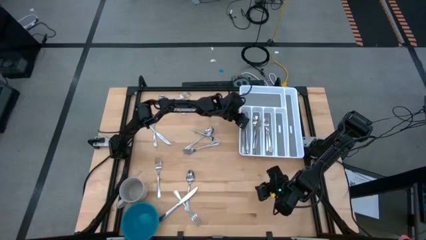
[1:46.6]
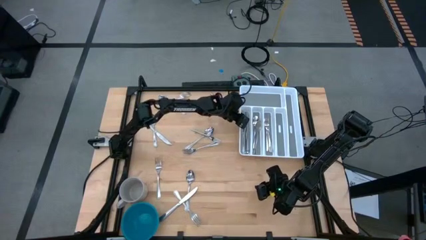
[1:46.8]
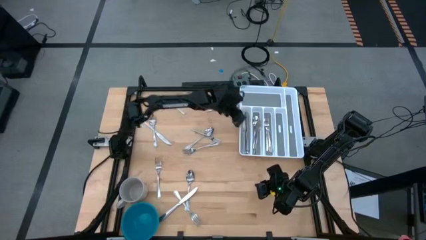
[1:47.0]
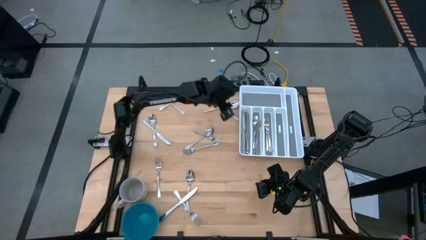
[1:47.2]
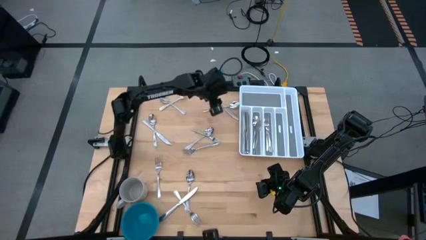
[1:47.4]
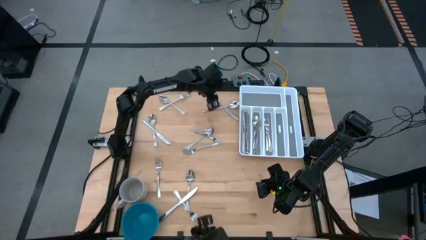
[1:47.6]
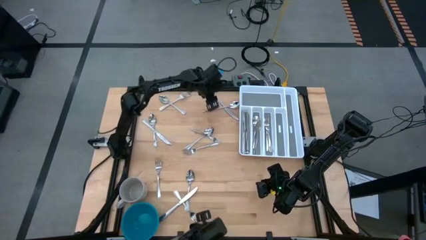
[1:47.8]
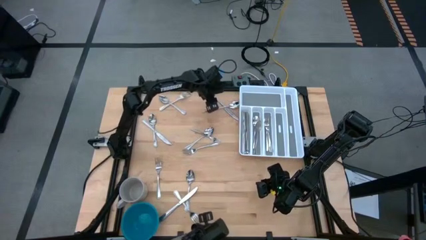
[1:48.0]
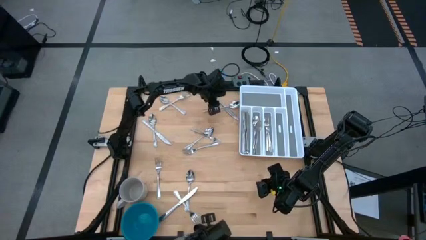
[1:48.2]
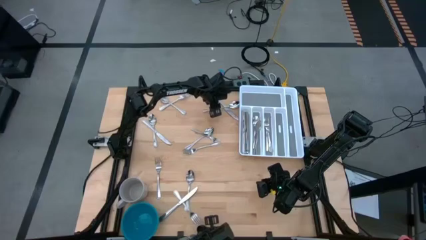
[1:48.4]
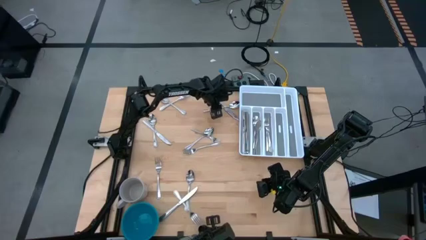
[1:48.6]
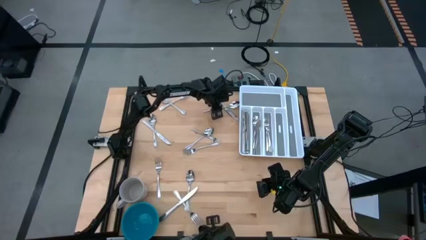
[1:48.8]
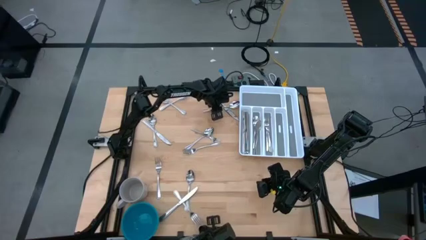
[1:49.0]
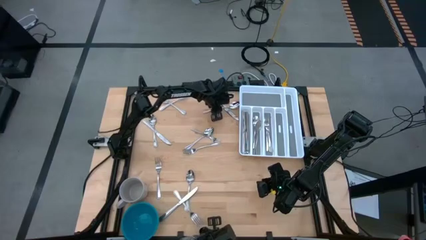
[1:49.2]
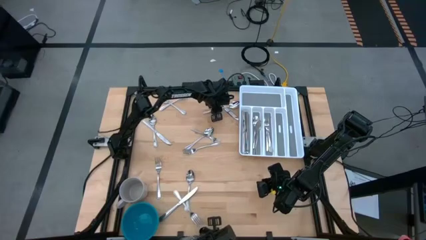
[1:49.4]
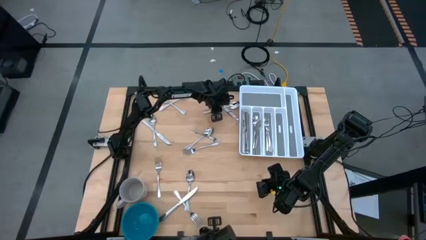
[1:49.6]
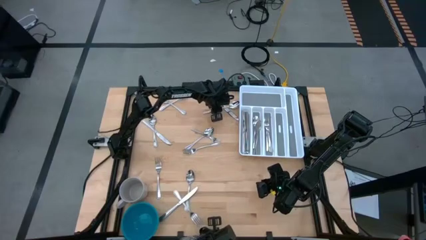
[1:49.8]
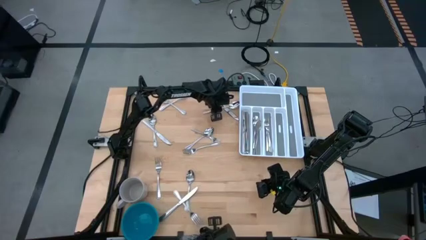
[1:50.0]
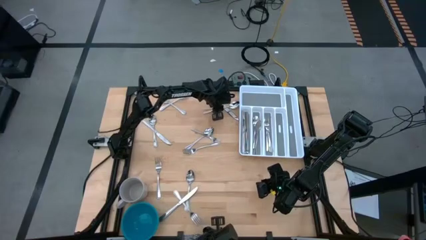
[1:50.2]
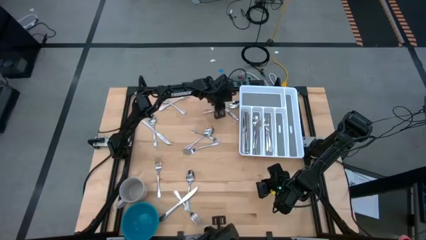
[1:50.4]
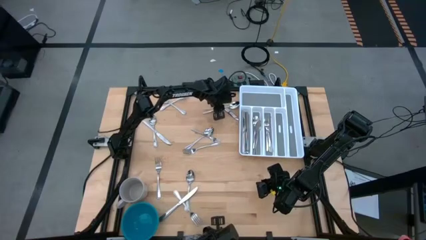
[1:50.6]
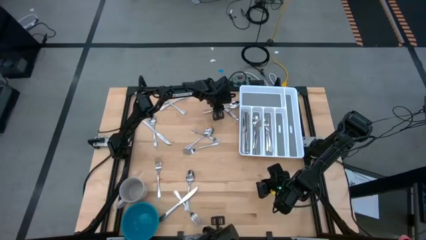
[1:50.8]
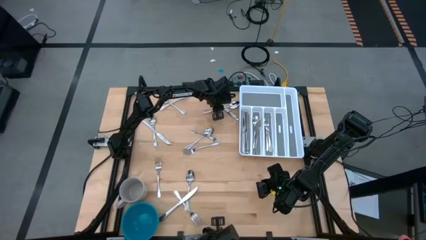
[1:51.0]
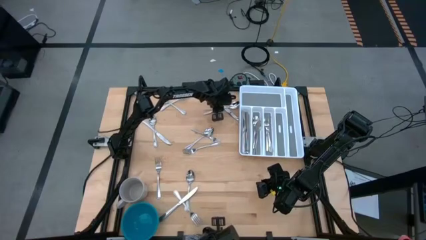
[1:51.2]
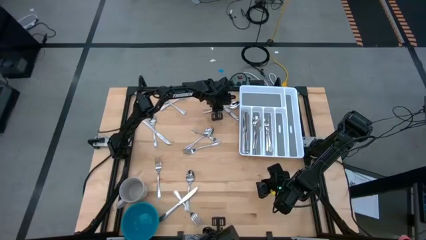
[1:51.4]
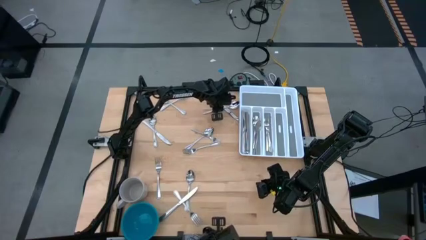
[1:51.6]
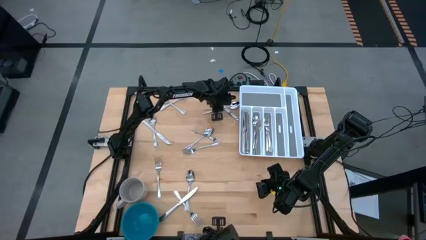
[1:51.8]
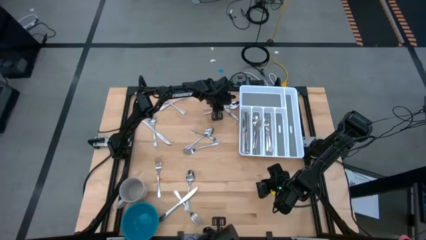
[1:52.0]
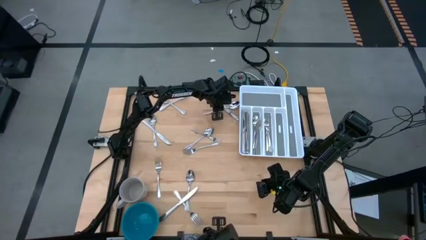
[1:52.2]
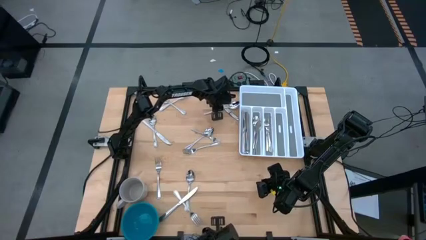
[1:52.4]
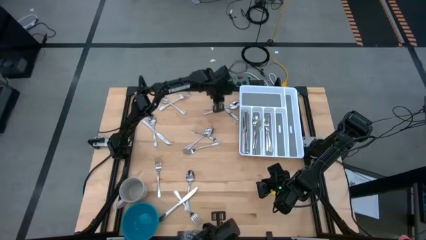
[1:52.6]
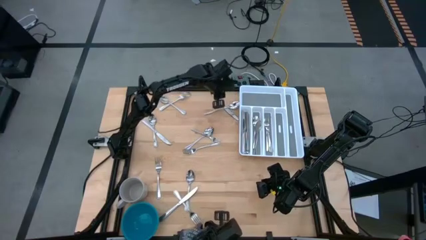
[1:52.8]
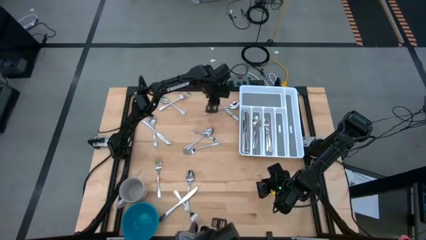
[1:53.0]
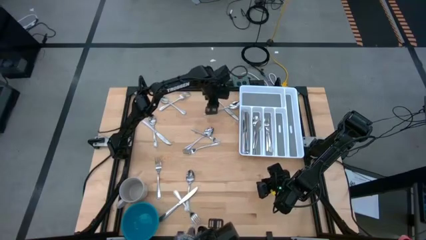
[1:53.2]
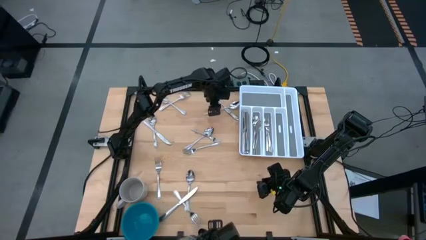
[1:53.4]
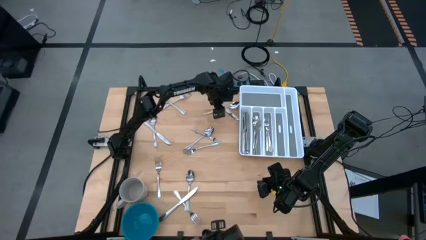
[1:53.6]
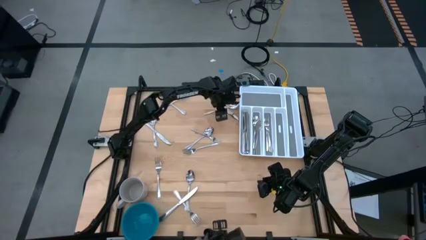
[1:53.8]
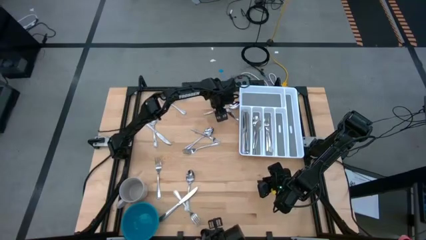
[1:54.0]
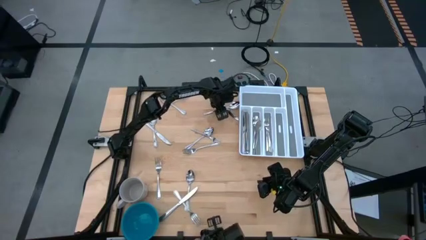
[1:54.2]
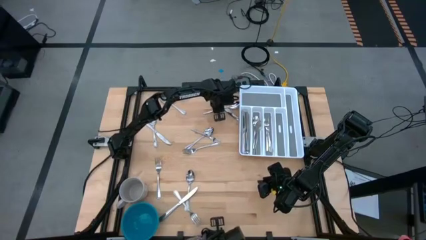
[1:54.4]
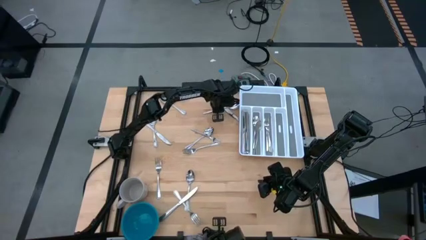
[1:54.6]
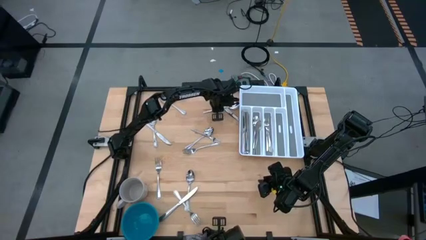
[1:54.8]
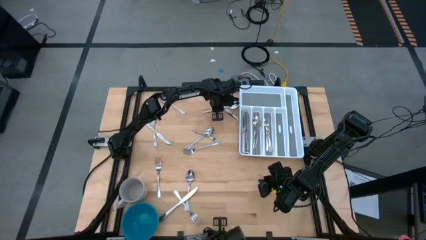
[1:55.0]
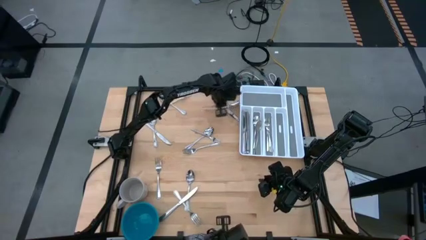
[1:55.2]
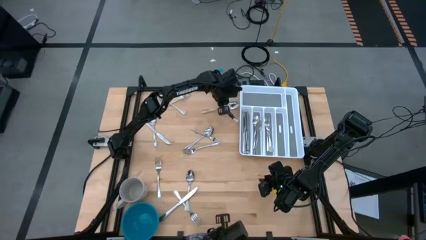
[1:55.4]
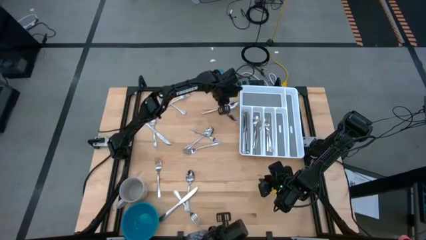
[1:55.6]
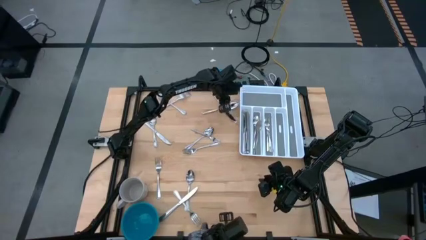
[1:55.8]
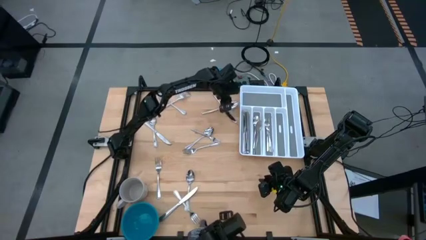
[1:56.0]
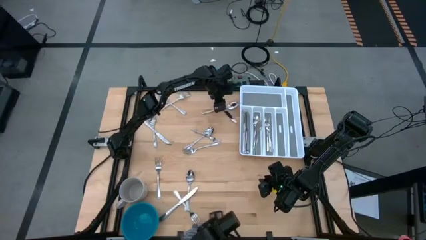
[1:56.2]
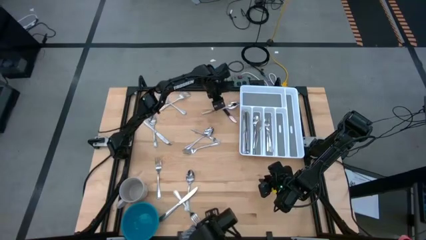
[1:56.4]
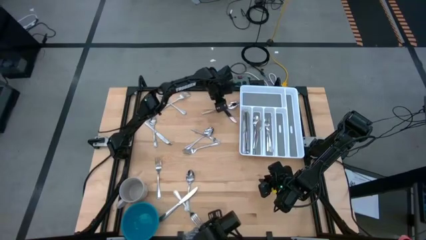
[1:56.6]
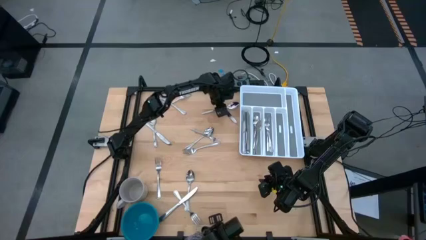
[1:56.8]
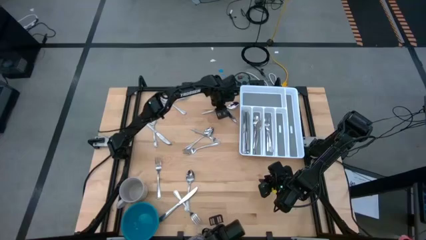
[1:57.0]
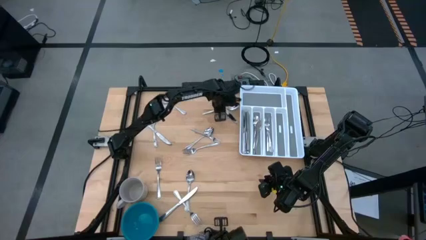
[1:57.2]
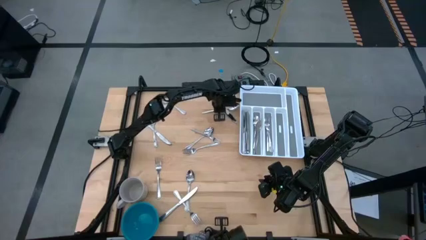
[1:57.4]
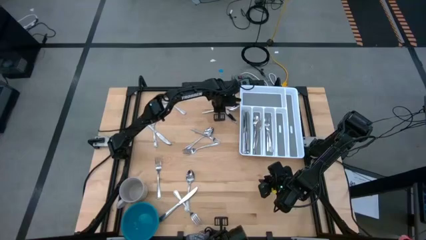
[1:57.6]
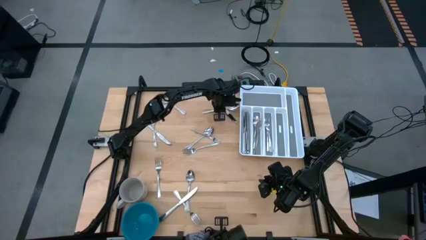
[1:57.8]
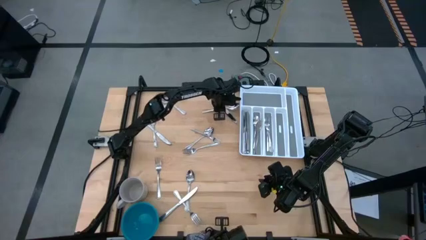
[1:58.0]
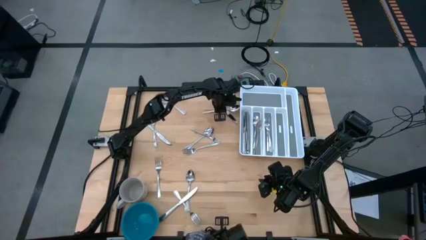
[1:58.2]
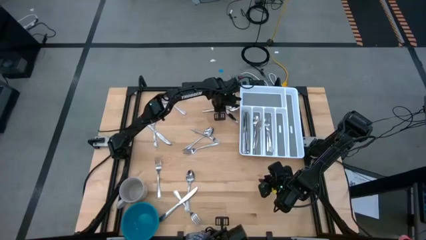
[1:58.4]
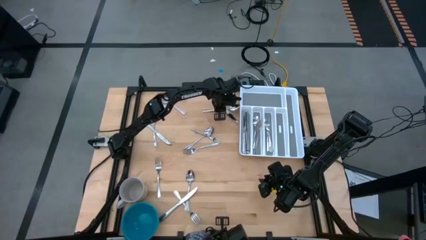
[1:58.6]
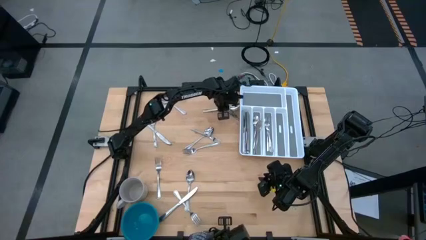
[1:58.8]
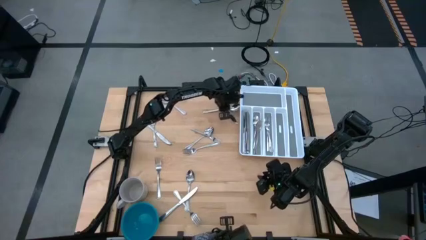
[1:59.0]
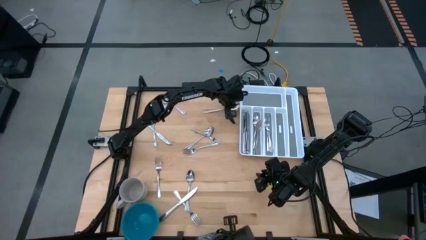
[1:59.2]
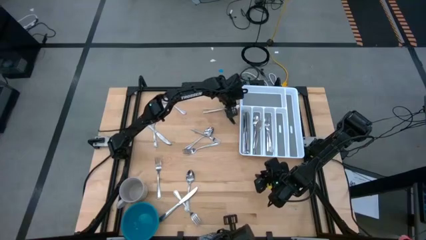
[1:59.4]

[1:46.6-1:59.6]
Task: Sort silverware
Put the spoon into the silverware tray

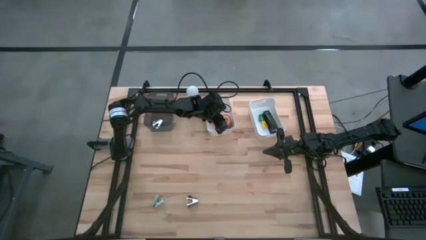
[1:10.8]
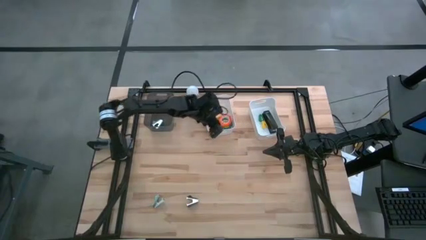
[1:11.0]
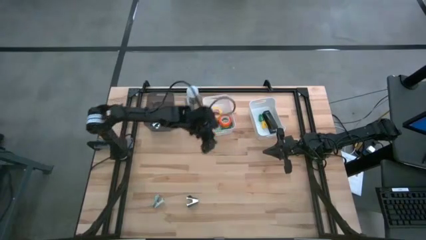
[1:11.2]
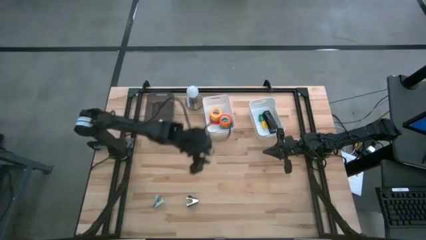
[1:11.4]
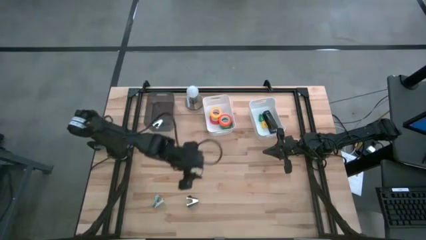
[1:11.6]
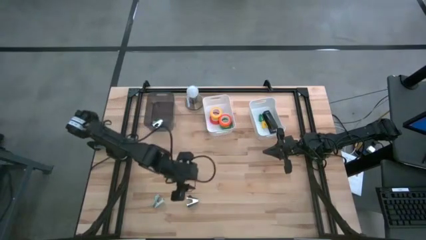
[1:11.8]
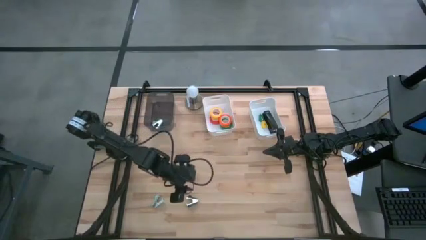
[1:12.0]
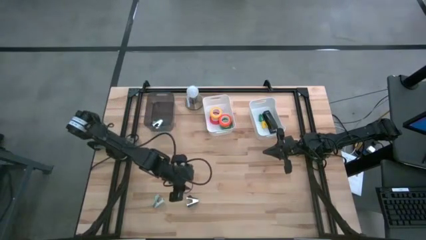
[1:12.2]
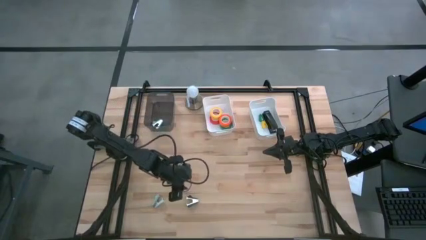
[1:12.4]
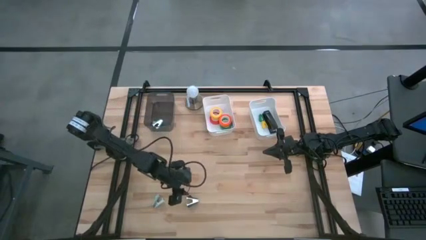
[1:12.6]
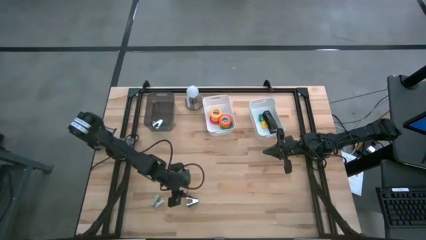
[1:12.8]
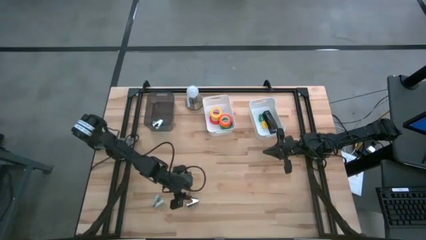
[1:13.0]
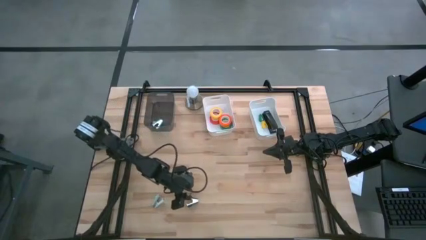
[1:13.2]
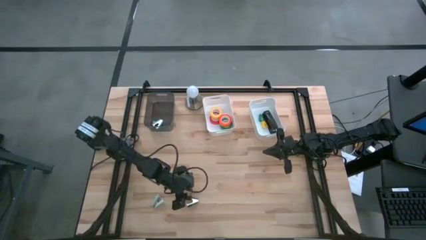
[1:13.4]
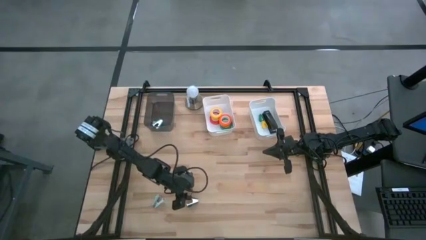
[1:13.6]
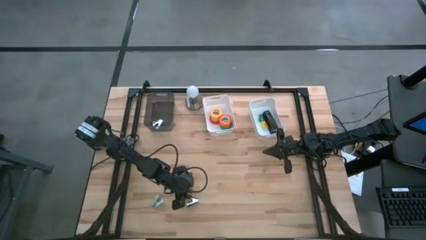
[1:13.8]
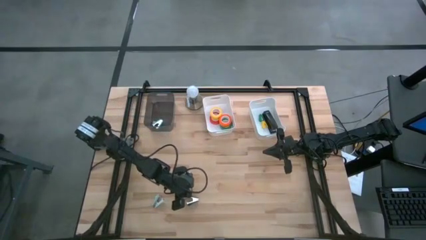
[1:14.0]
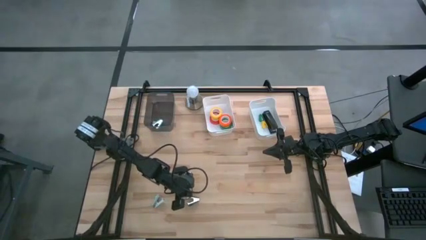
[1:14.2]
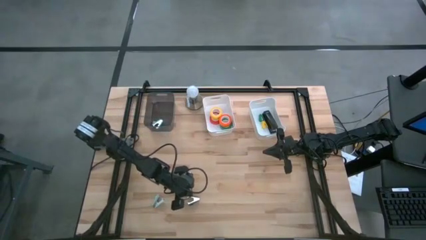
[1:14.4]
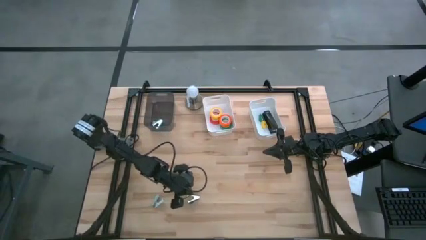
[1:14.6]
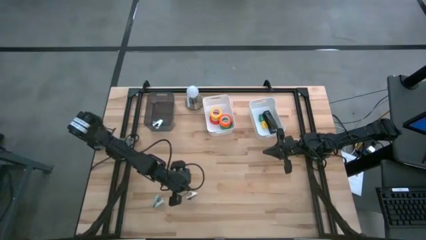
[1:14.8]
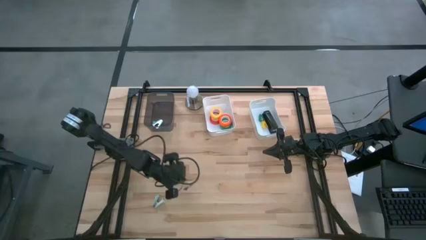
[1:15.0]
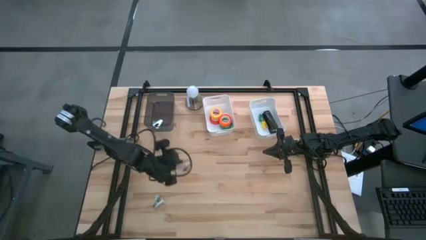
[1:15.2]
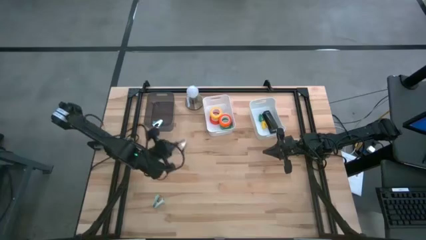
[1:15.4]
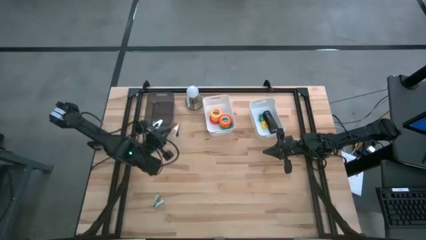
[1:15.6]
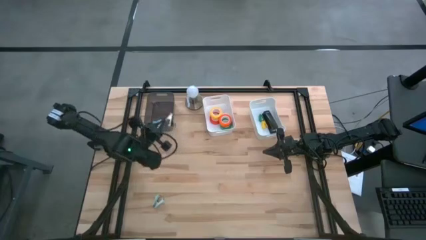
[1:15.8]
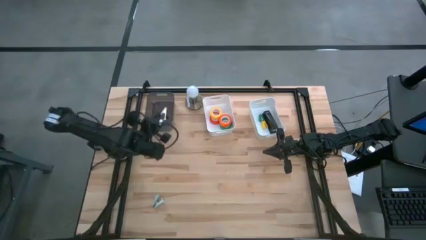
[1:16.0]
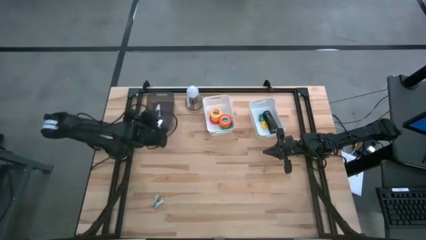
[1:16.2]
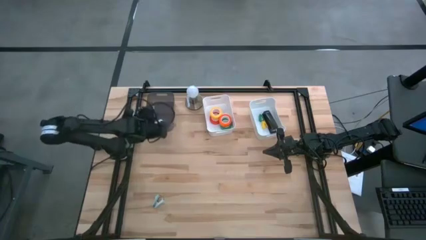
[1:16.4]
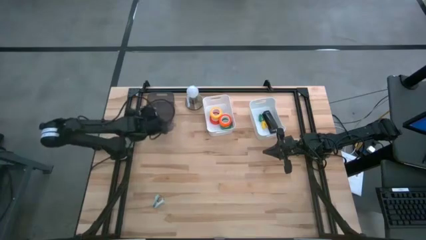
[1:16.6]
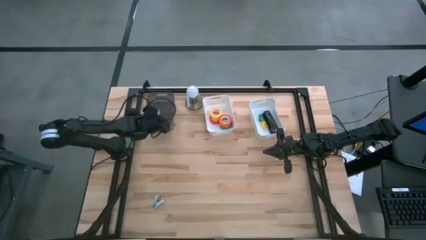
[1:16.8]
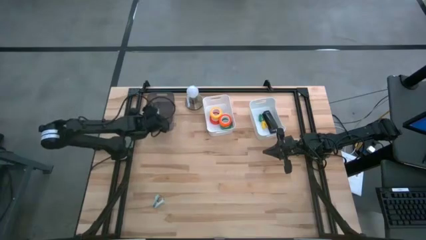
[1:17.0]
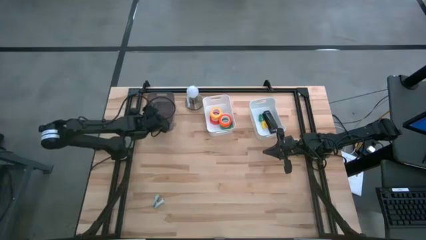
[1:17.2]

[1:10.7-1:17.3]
Task: Pick and place Stapler, Stapler remover, tape
Put the black staple remover into the black bin
